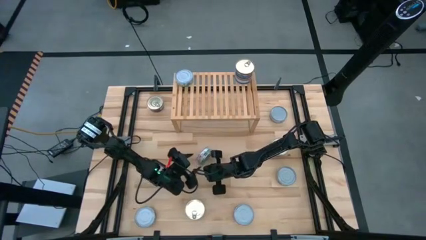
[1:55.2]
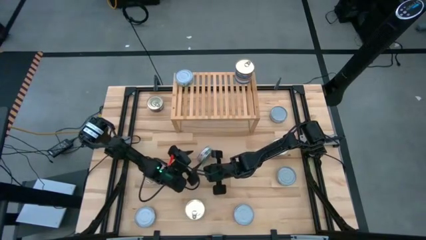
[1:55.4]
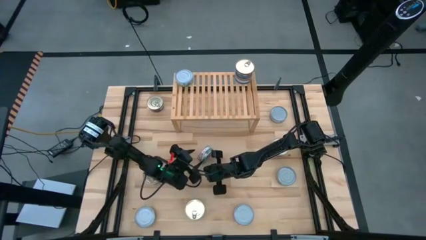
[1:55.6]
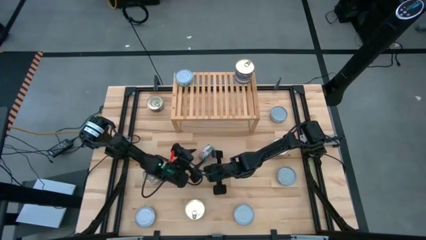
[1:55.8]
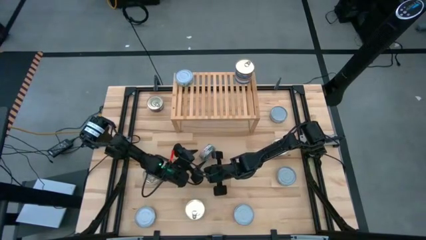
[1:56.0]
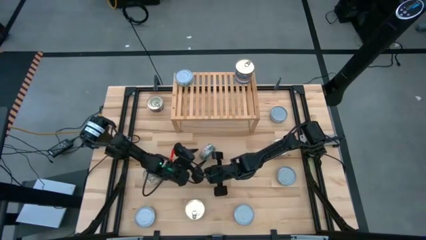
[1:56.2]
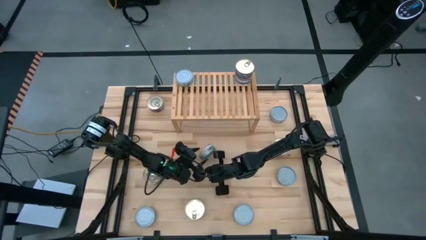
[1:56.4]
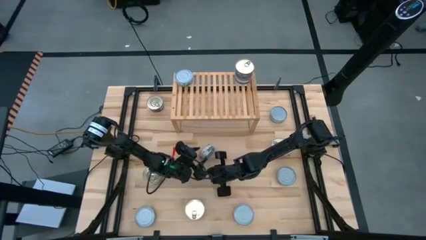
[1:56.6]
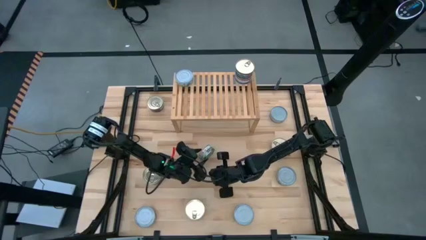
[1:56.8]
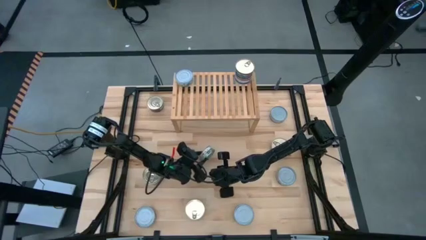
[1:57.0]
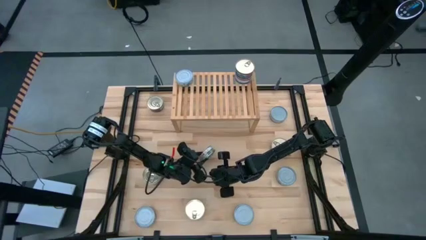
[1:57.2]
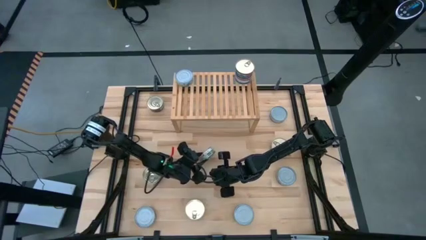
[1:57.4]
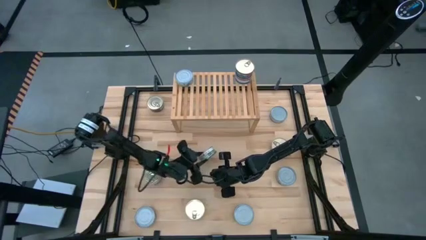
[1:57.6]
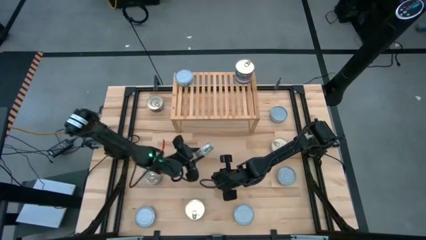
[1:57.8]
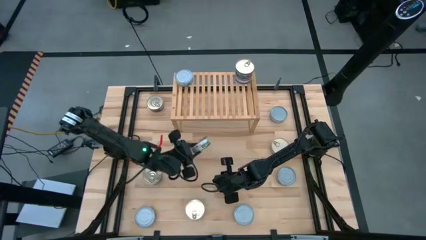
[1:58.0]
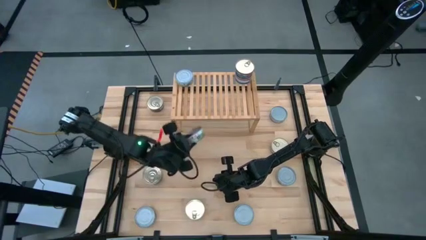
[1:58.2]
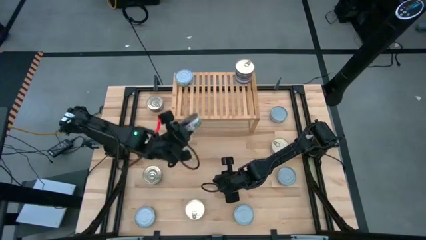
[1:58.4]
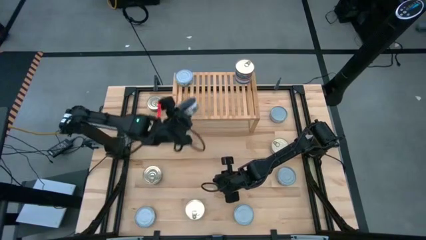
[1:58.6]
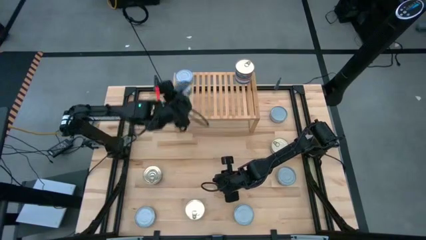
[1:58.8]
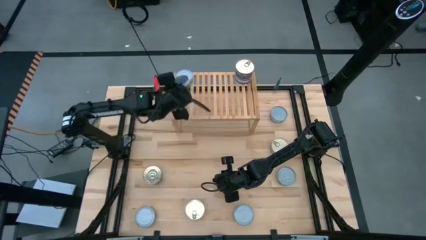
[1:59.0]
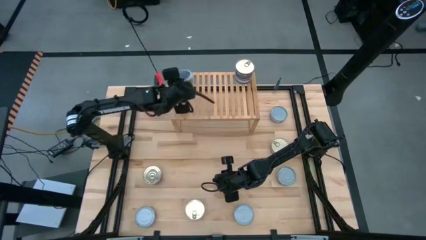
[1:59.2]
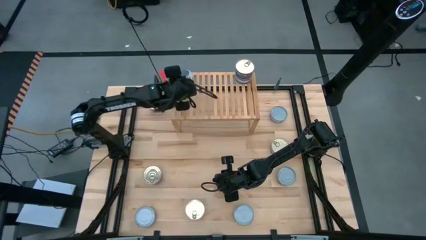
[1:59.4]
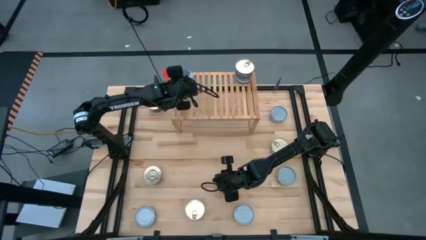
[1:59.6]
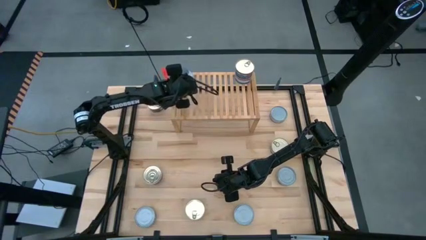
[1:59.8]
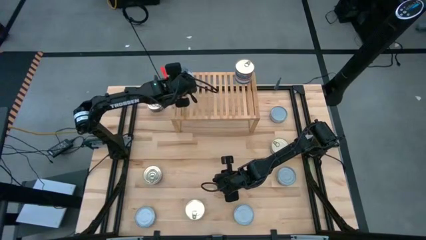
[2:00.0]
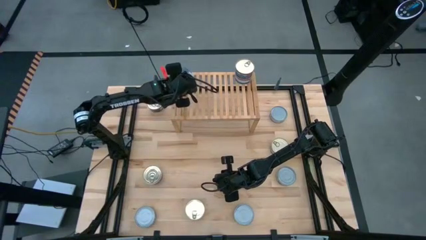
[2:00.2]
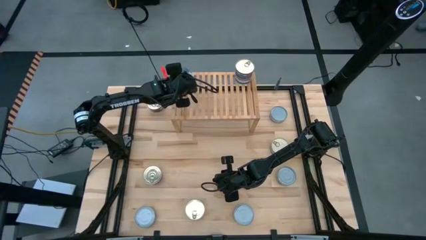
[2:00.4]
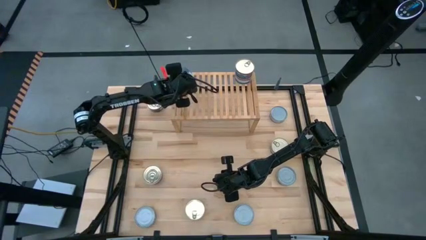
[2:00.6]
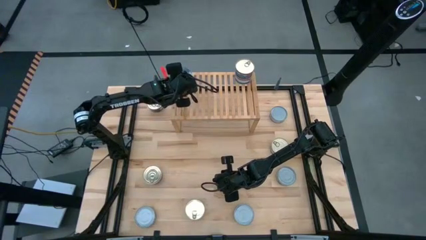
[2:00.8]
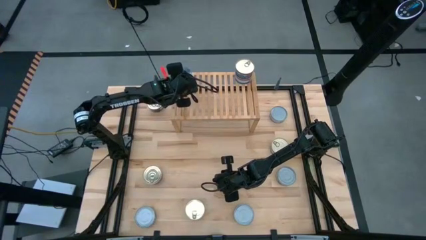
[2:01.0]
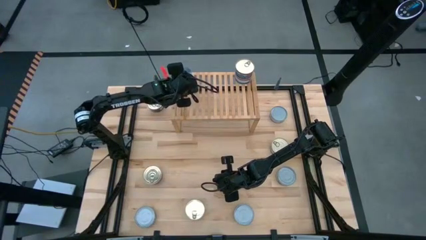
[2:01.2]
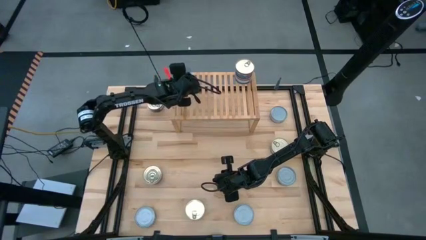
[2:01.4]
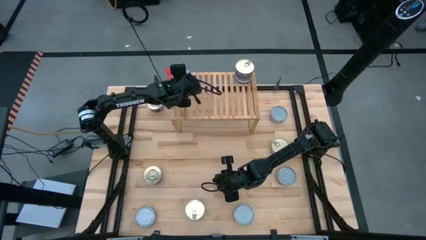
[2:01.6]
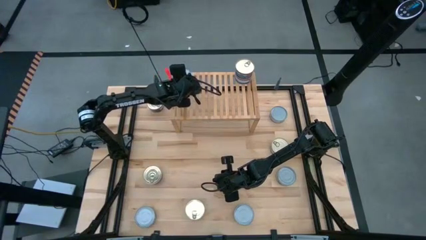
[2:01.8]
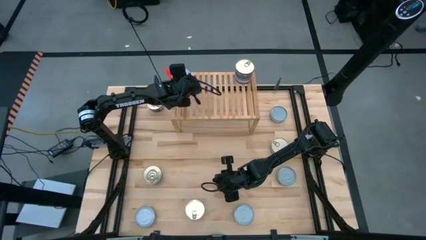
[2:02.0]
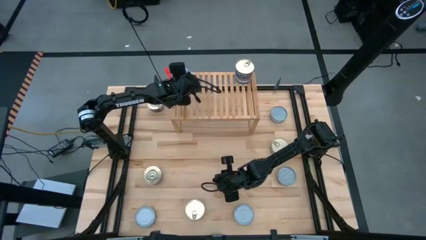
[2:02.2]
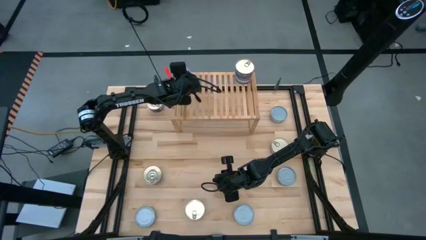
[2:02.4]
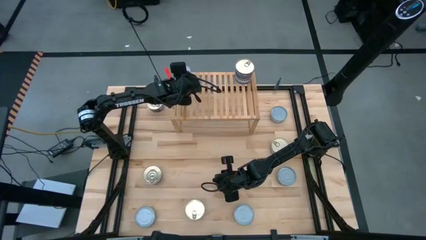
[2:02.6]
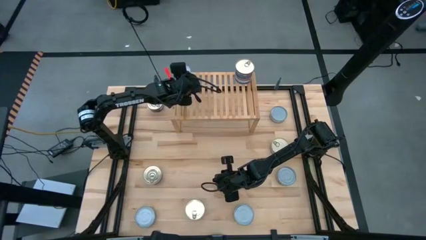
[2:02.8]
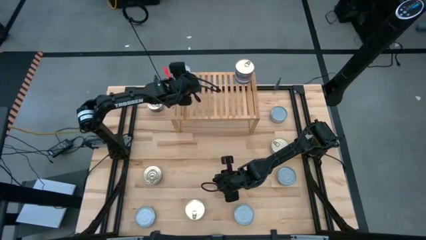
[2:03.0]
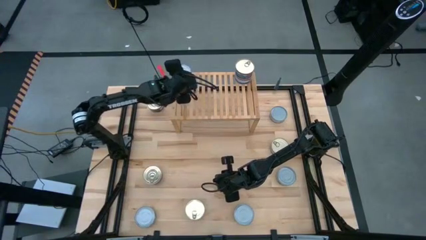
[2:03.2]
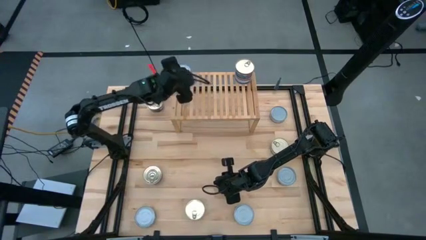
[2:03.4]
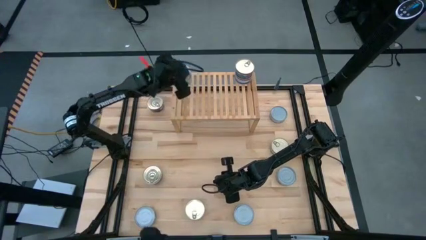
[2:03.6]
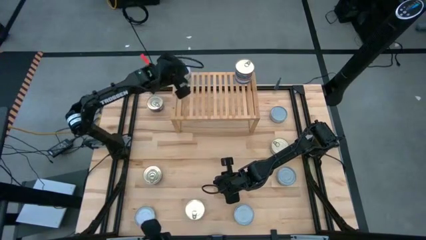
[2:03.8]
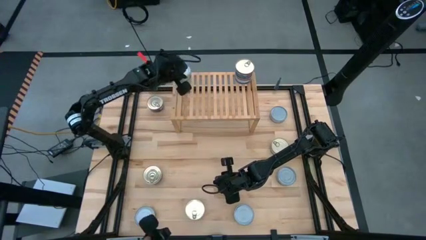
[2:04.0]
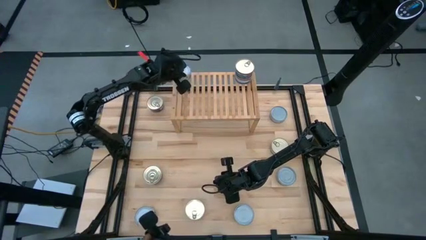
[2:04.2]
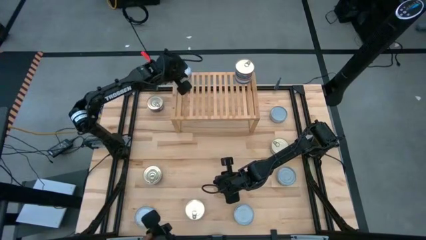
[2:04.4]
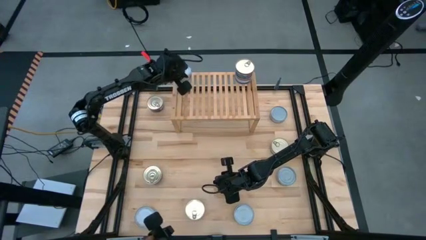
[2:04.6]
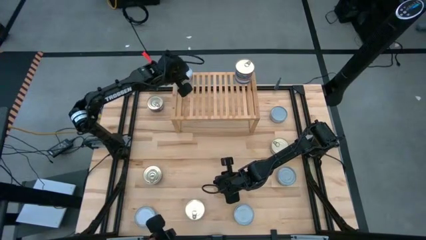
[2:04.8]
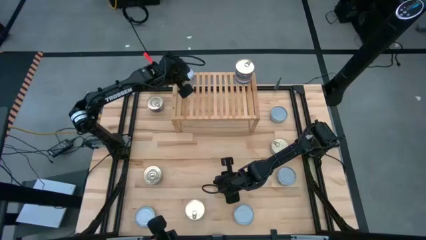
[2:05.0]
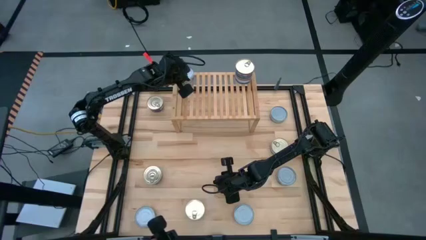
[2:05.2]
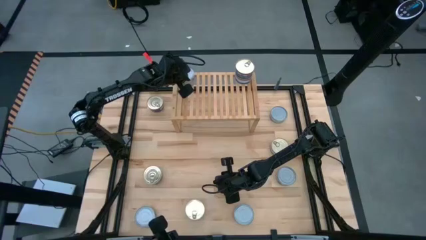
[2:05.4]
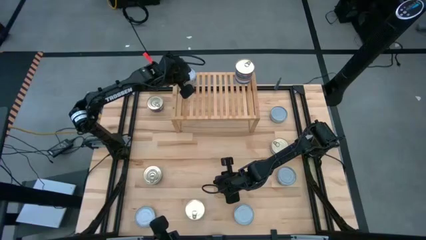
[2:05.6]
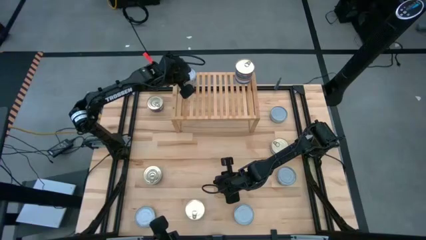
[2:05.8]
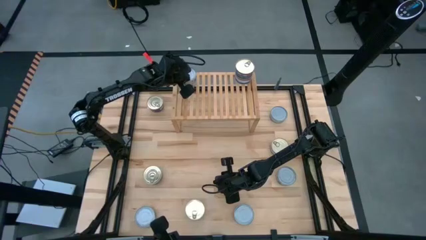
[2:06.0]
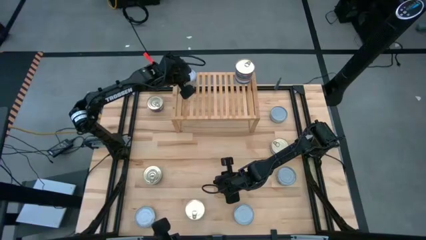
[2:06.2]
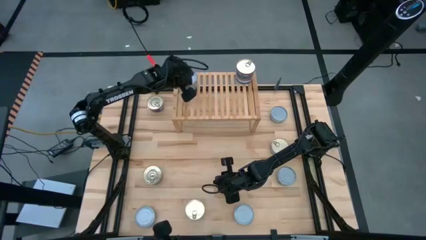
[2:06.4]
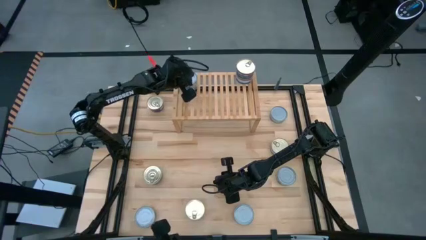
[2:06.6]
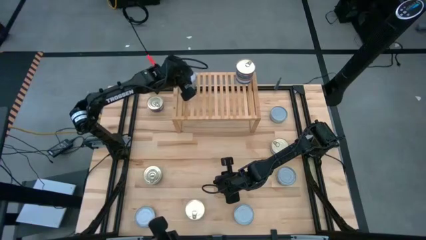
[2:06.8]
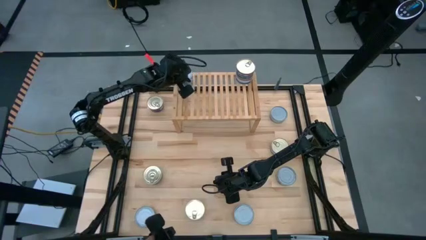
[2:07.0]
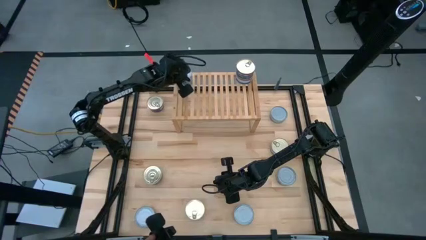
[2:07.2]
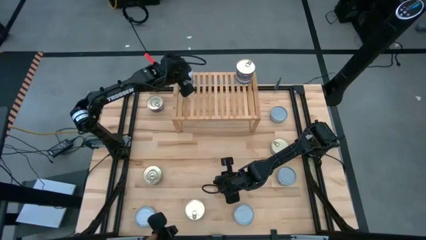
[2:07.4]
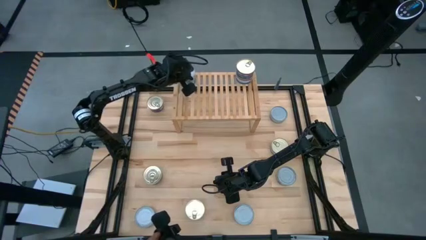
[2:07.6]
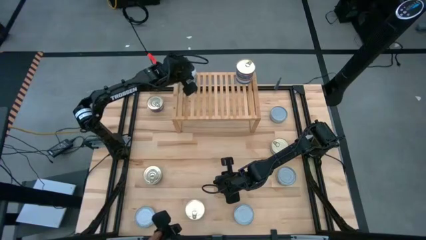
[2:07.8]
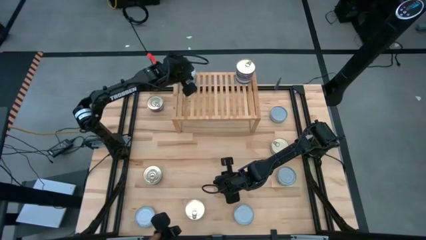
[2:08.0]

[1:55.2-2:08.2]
Task: Stack canned seafood by type on shelf
Stack the green tuna can on top of the other green tuna can on the shelf

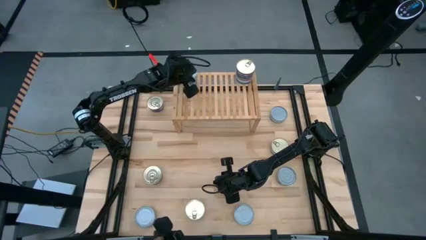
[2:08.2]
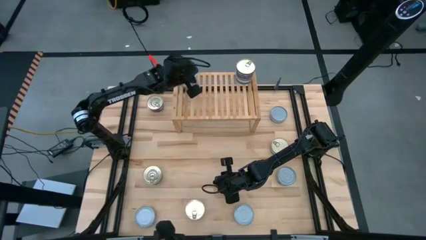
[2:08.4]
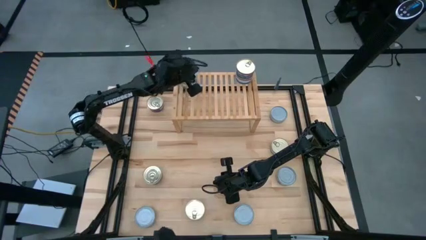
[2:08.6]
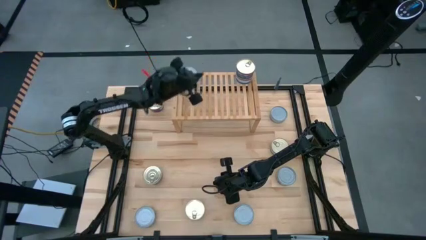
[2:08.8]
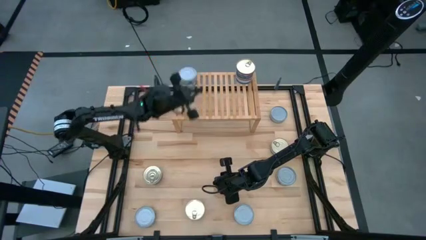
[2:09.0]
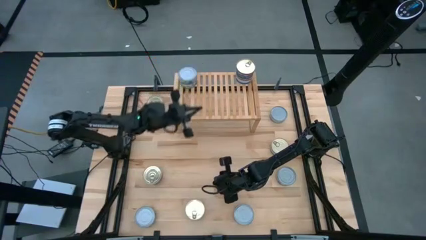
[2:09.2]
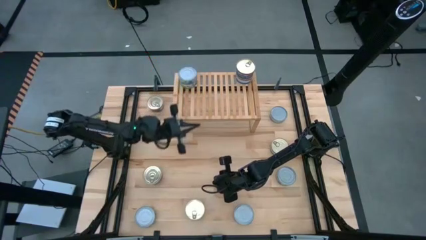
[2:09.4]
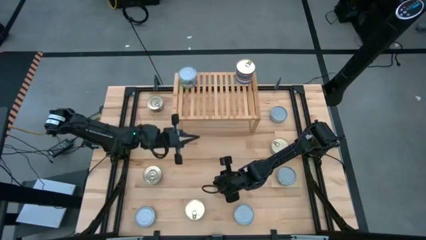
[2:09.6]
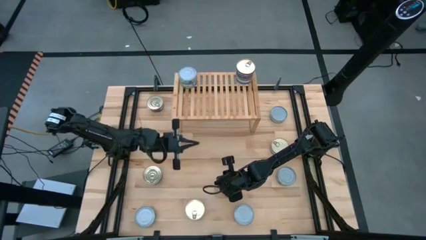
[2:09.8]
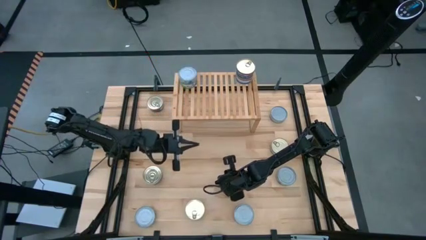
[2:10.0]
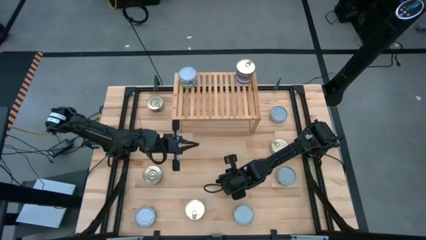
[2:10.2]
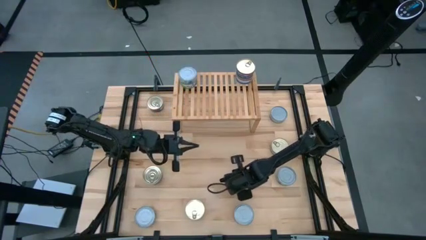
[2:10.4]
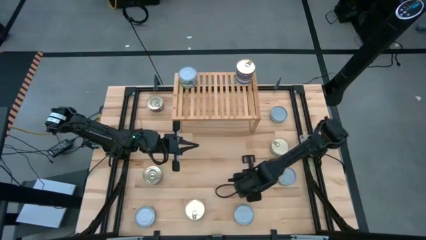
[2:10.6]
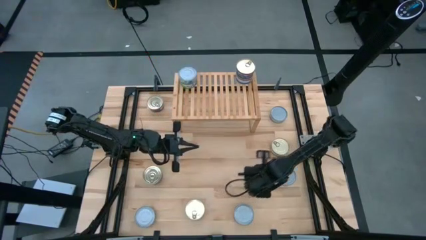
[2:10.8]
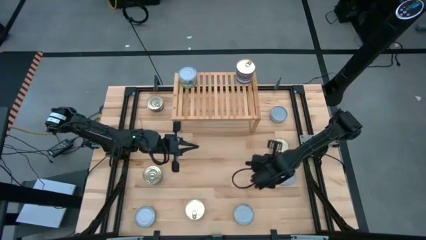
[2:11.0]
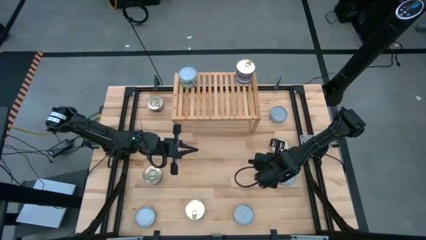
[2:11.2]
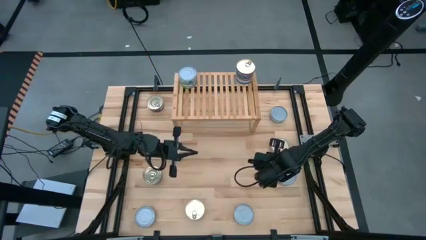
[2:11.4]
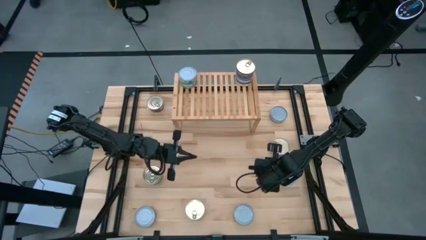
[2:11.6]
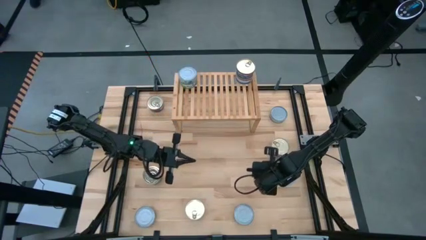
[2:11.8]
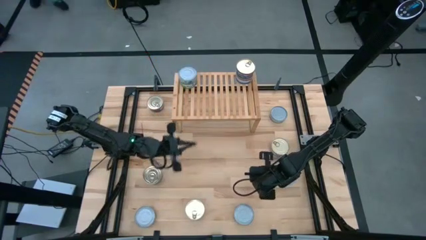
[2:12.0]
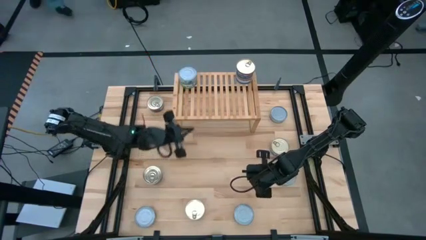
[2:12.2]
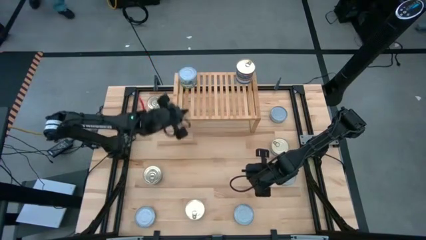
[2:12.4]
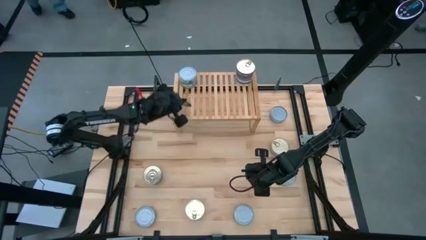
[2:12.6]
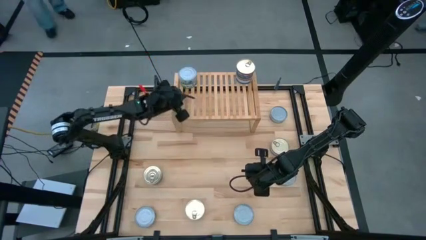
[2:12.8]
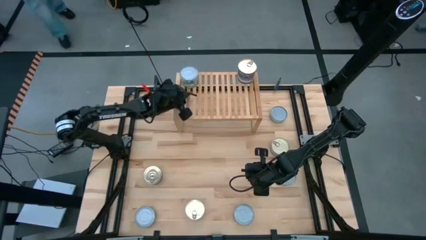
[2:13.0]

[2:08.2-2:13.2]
Adjust the shelf
